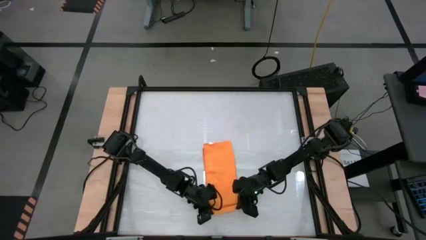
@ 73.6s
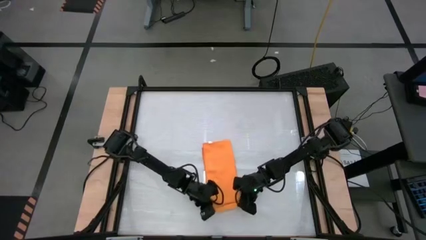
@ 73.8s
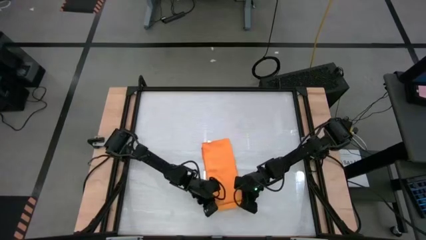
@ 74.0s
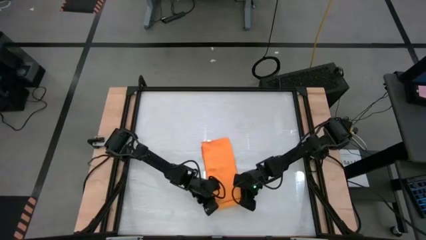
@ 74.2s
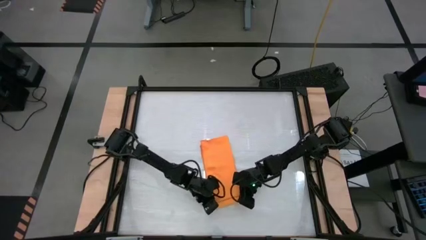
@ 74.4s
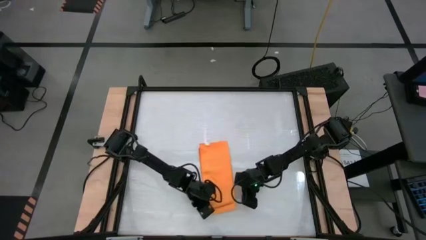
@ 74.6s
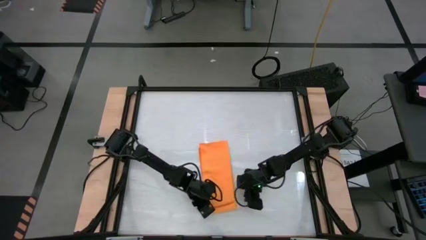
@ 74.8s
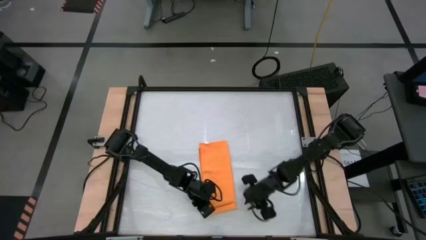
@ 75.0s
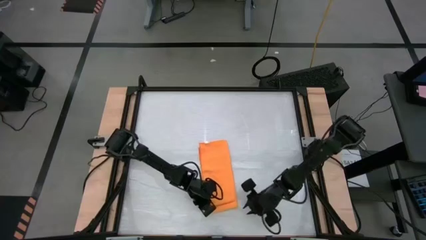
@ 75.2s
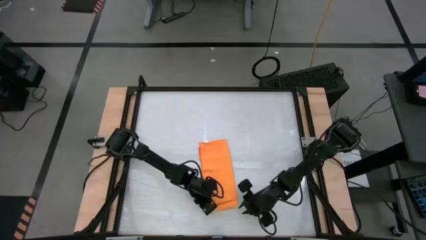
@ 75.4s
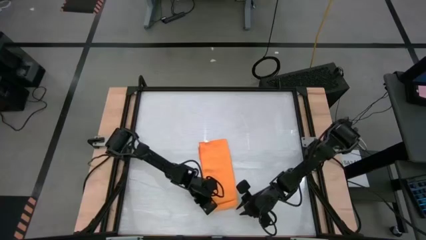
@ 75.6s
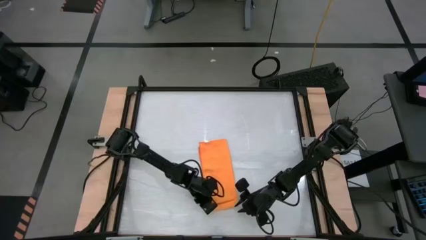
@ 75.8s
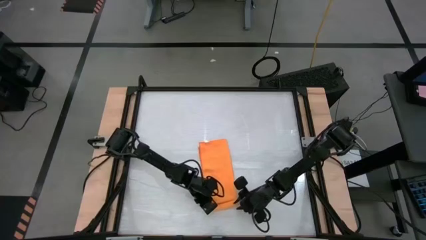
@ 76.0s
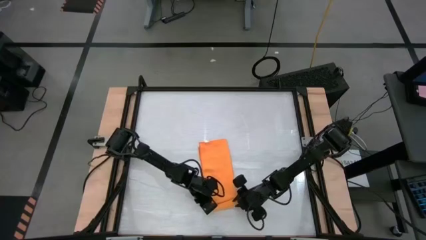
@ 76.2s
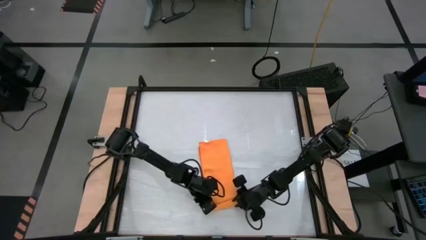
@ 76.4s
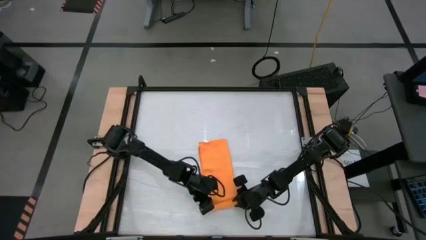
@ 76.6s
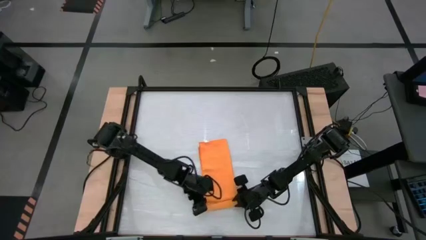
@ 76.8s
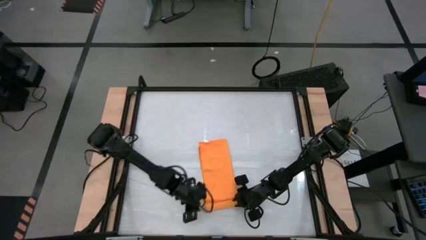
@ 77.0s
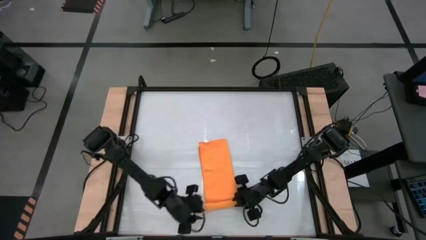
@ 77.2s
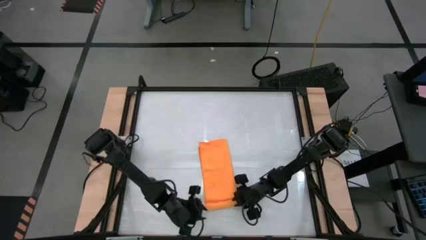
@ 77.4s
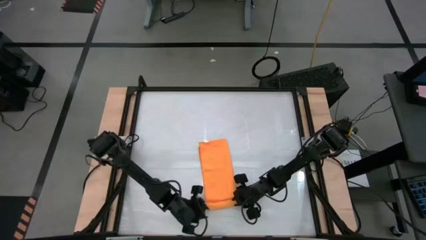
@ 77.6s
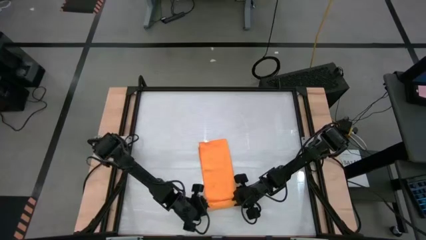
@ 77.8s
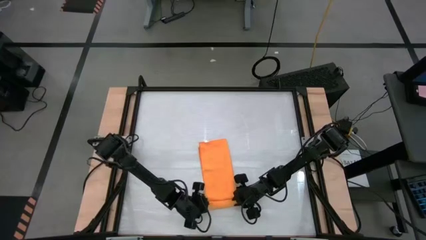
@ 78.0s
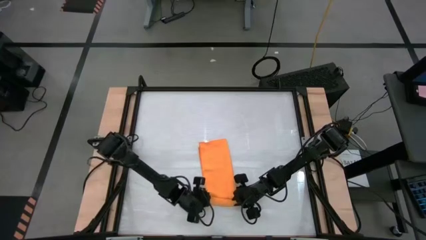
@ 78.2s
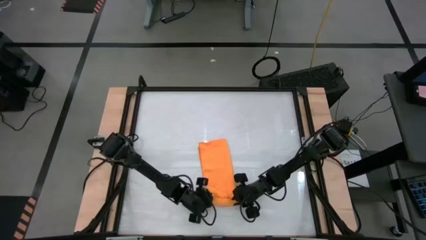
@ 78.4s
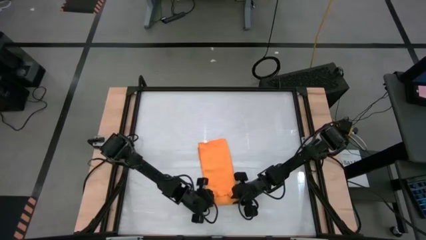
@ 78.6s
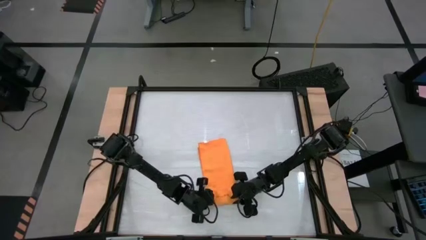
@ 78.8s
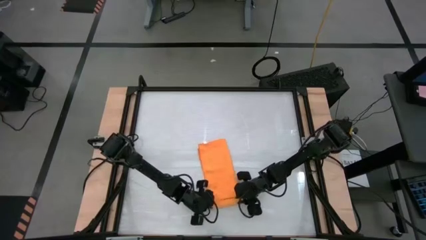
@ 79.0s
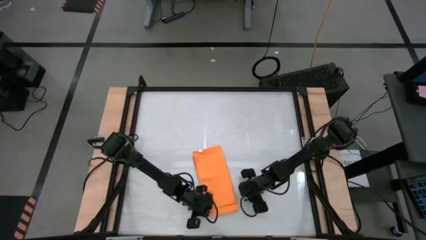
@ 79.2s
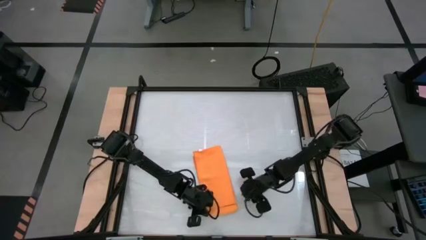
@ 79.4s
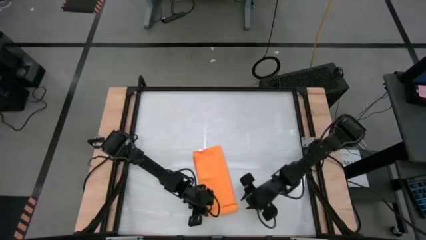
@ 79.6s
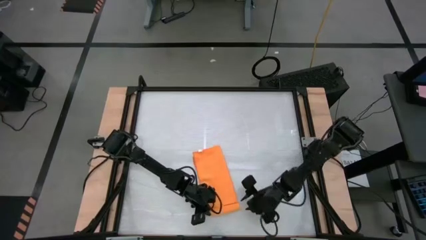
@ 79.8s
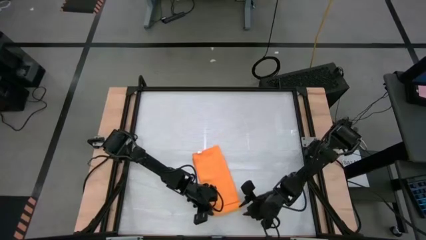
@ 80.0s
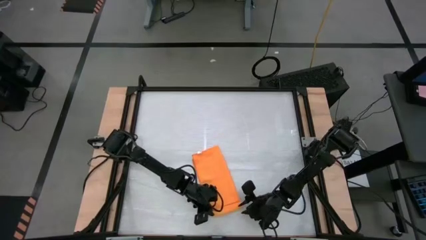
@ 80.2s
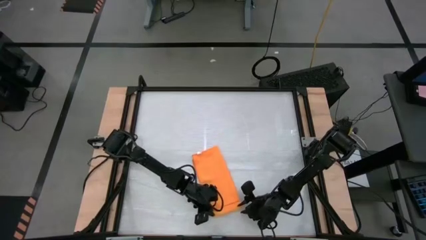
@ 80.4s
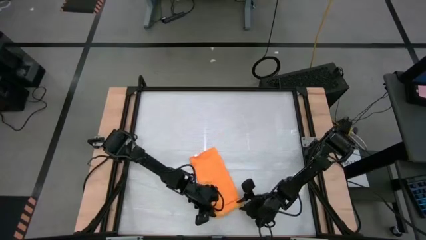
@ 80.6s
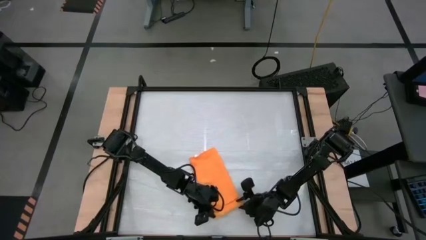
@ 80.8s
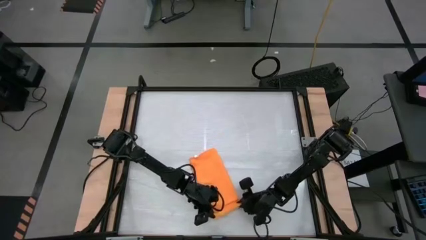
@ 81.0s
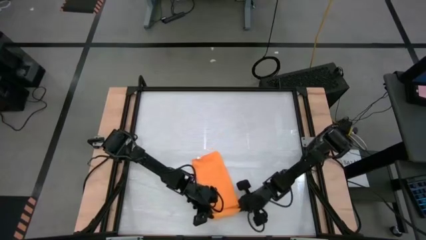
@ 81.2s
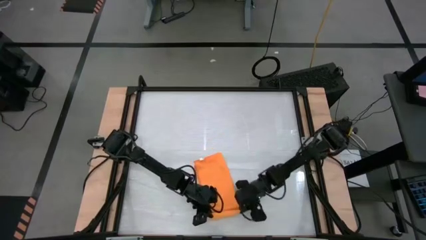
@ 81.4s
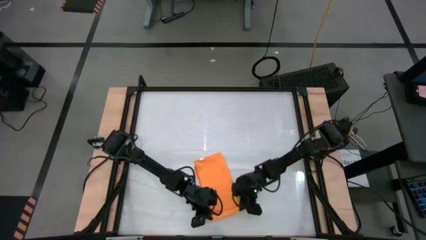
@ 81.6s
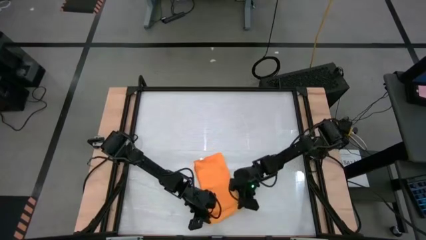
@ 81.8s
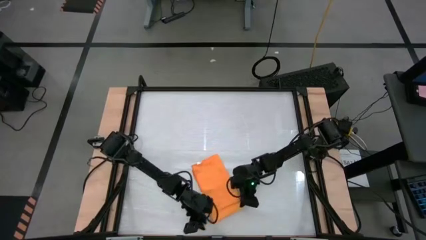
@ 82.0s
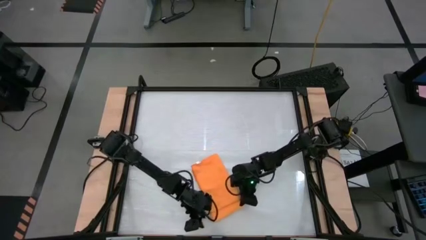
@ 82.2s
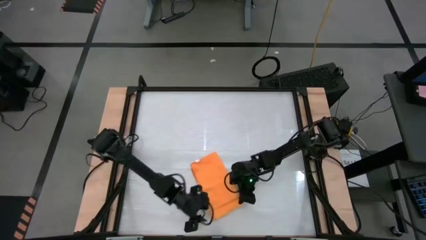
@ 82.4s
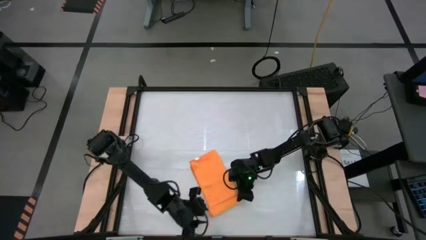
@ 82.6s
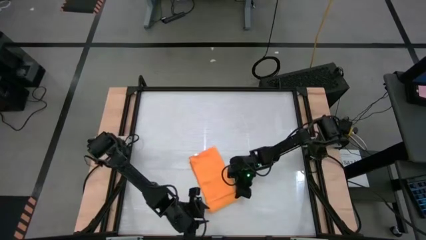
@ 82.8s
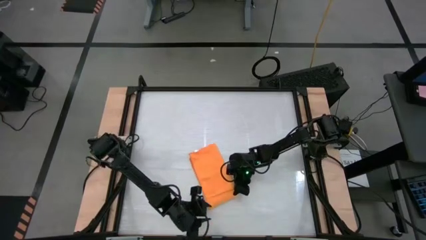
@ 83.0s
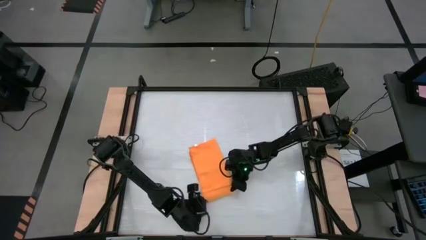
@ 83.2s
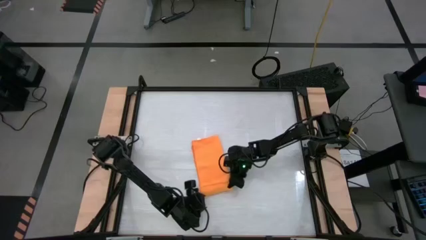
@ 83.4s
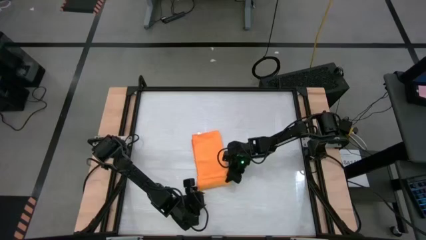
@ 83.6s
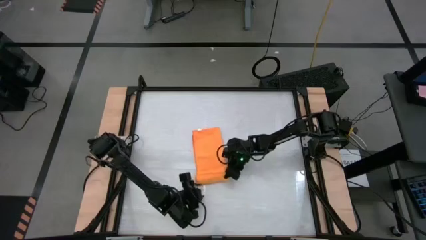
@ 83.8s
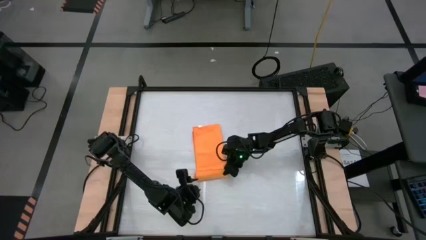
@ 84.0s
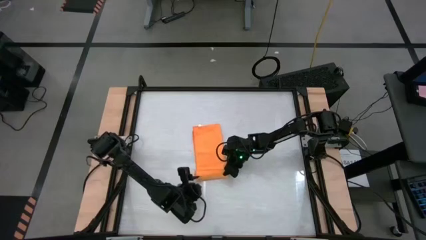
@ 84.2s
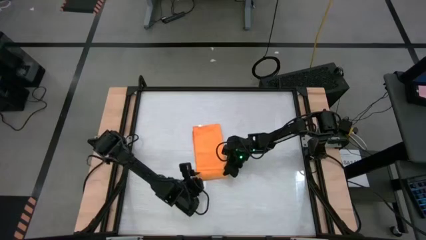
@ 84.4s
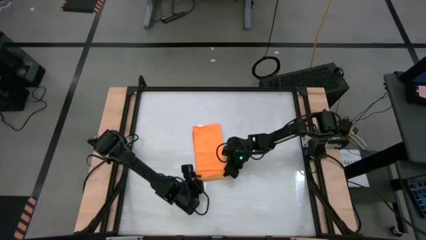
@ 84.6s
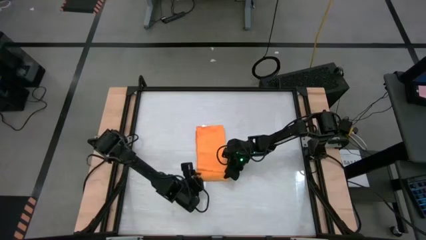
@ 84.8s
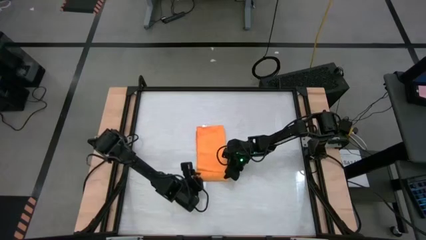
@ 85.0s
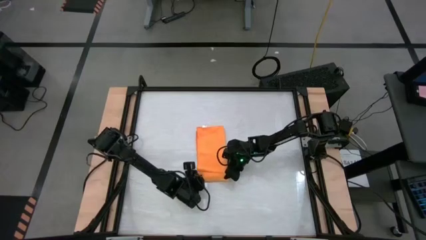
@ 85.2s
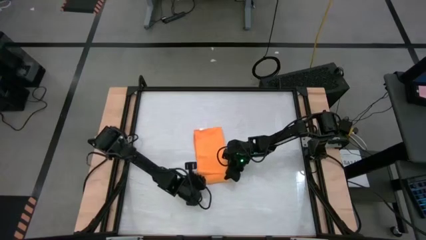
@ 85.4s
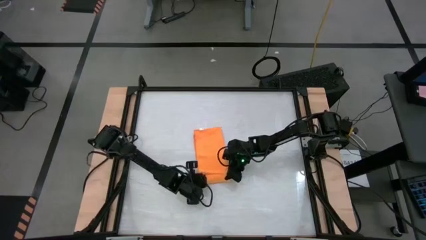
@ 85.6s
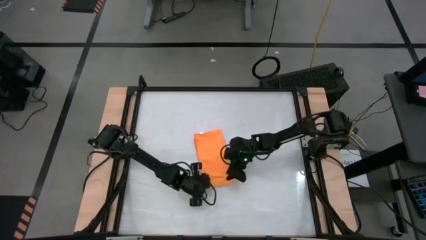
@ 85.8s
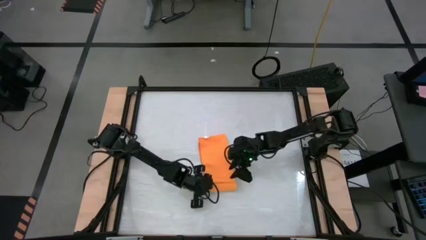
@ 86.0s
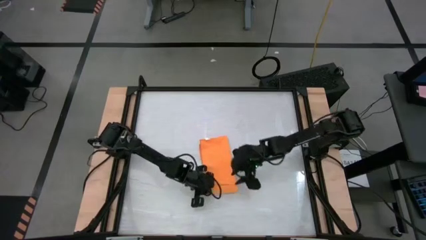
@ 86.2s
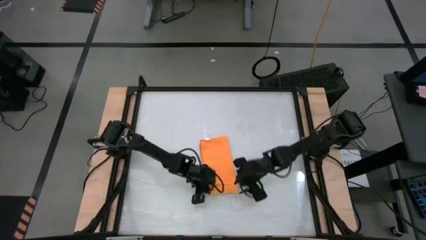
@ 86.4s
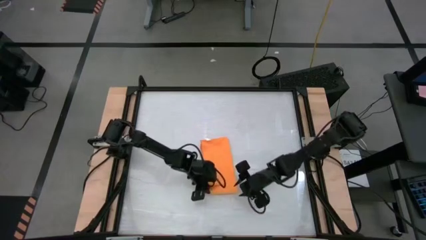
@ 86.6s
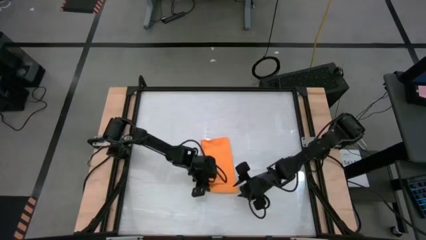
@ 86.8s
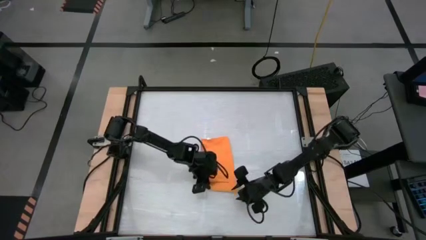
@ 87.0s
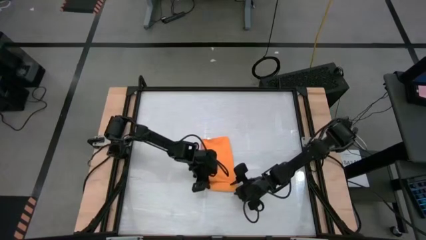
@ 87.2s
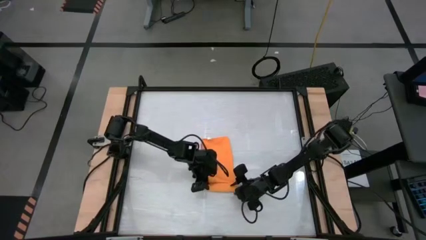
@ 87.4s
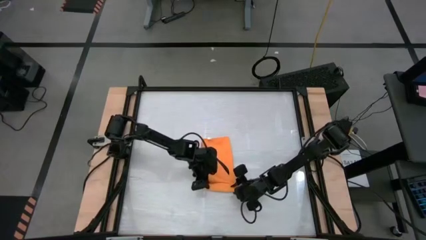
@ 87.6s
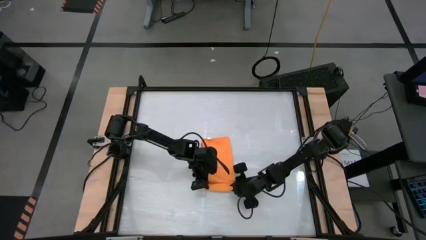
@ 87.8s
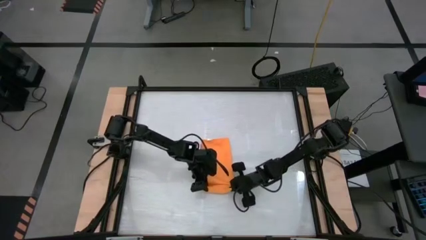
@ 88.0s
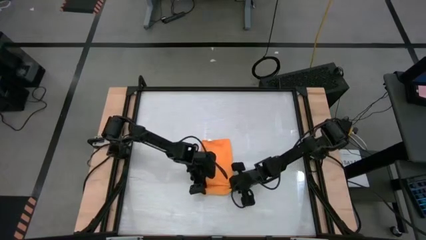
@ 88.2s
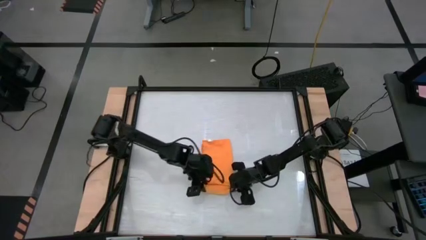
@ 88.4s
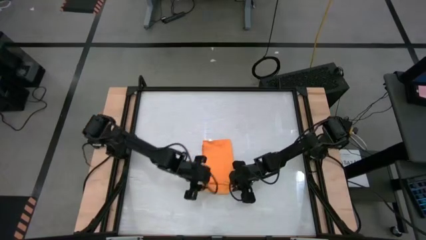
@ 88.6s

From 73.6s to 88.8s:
Task: Roll towel
Roll the orange towel

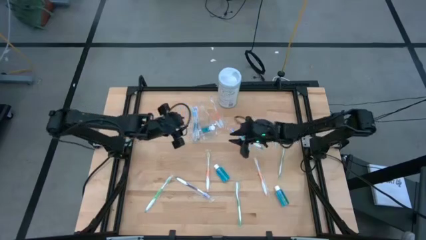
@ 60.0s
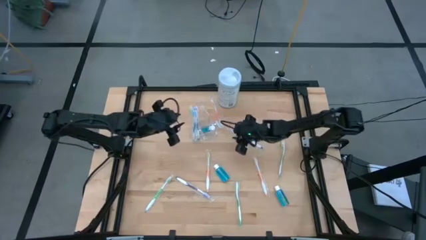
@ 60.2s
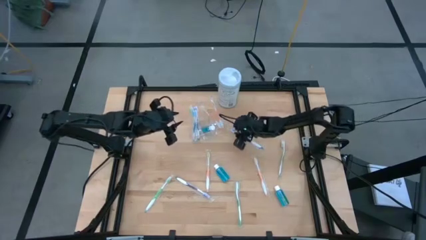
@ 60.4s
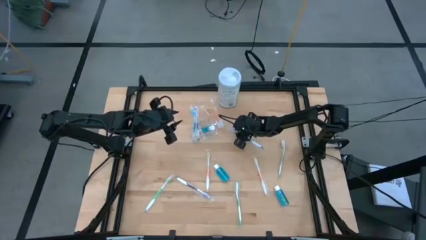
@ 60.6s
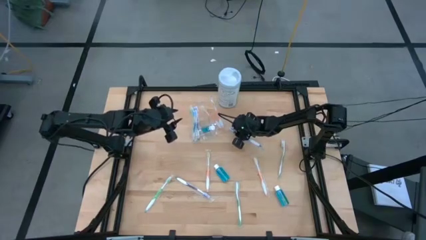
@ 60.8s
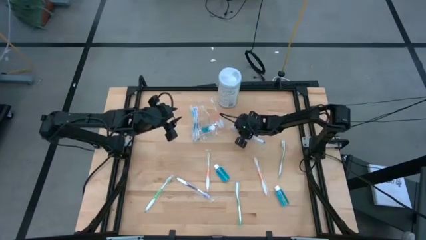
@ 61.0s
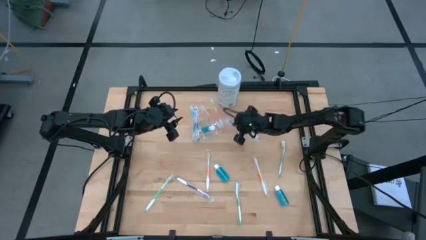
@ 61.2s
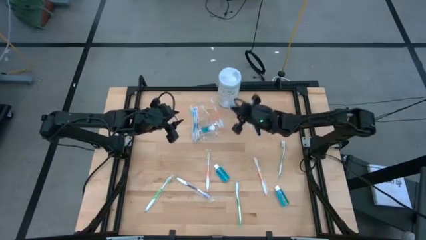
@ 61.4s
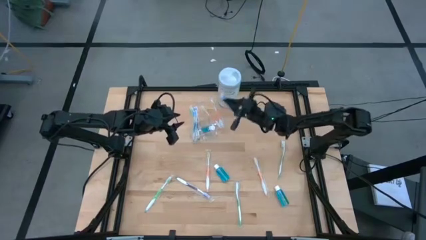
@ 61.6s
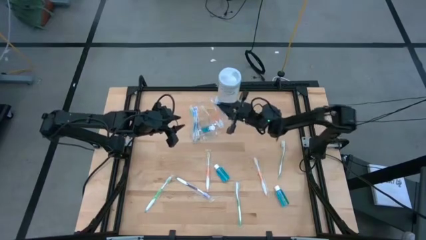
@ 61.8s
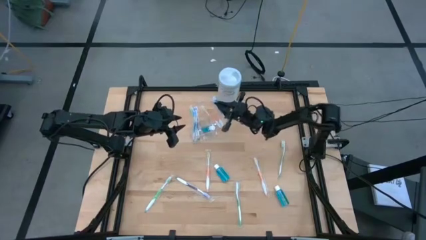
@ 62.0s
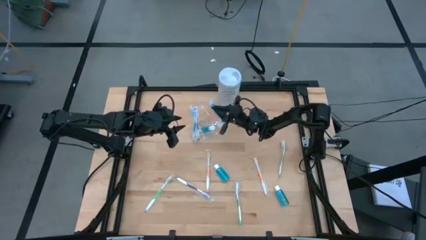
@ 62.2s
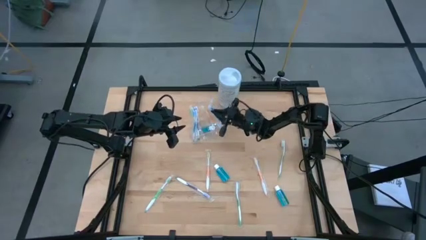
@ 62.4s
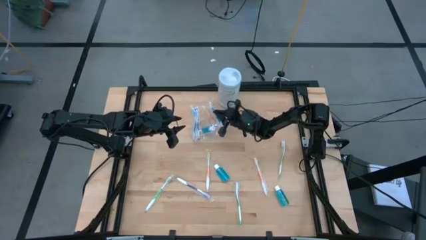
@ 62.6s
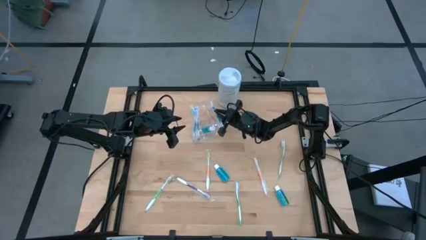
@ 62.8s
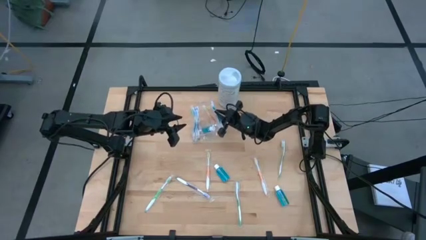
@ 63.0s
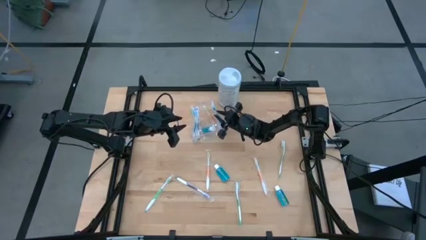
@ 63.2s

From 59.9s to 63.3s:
Task: Pick & Place toothbrushing station
Put the blue toothbrush into the transparent organizer
